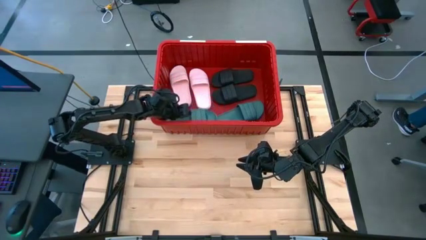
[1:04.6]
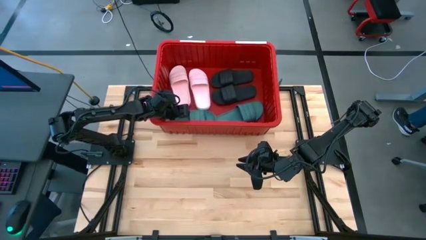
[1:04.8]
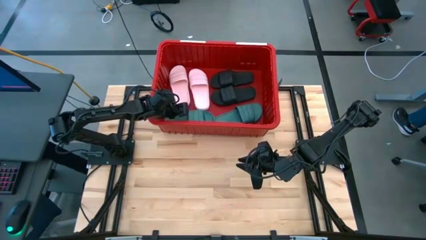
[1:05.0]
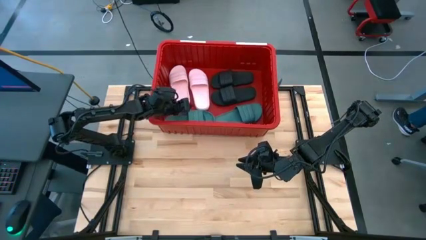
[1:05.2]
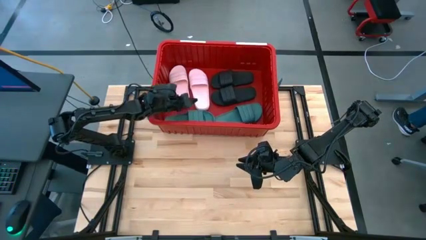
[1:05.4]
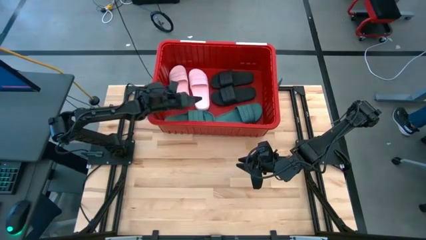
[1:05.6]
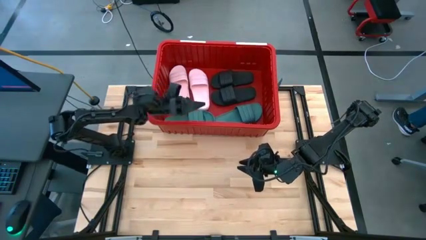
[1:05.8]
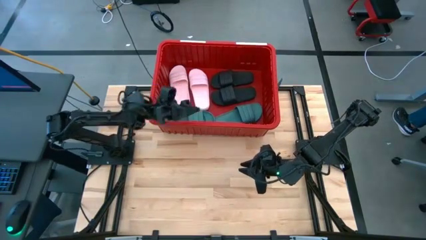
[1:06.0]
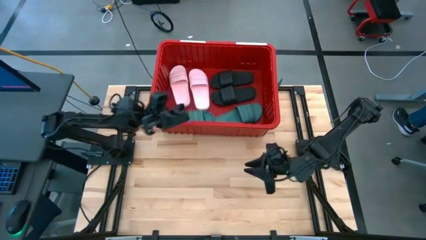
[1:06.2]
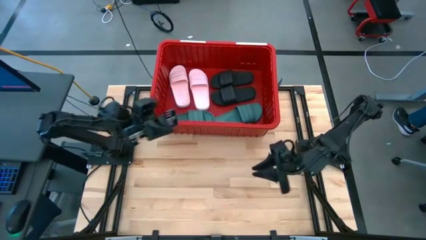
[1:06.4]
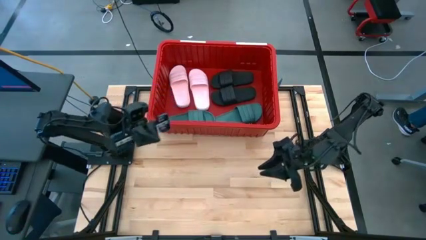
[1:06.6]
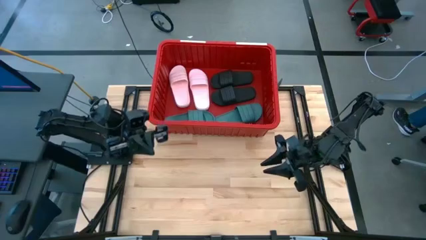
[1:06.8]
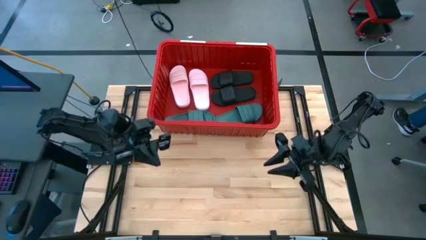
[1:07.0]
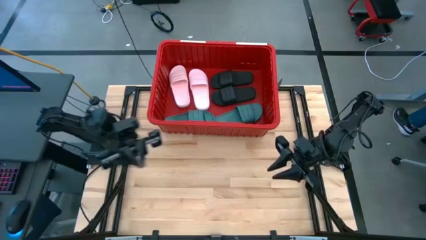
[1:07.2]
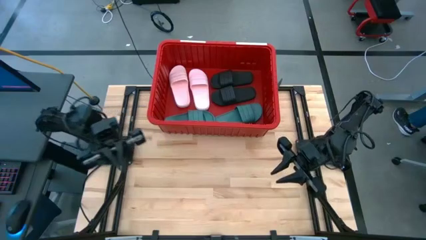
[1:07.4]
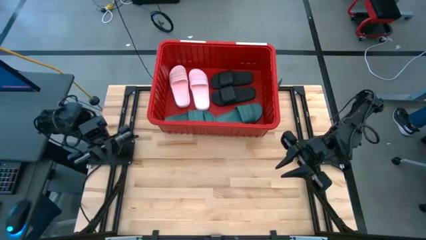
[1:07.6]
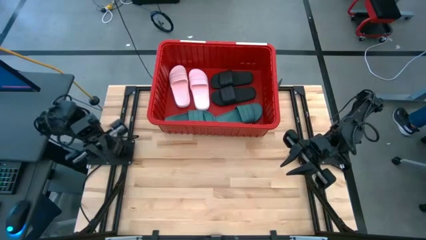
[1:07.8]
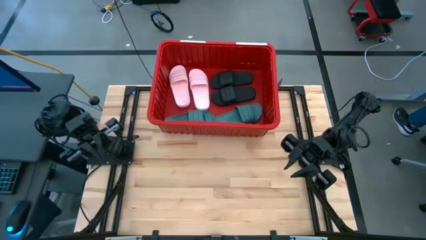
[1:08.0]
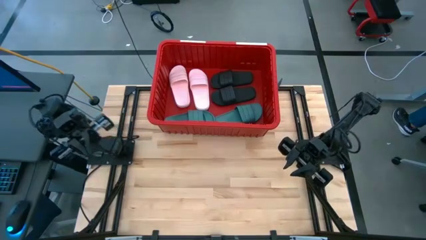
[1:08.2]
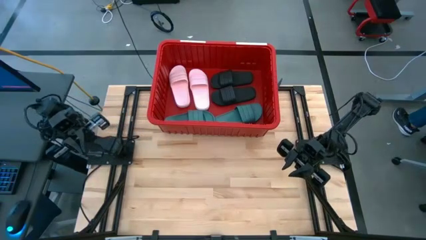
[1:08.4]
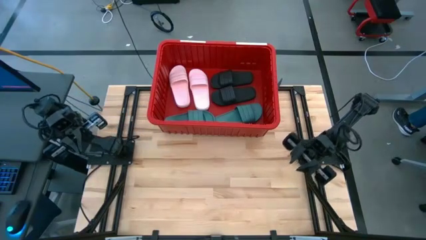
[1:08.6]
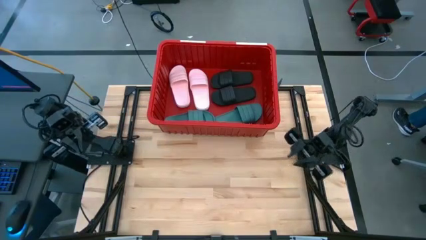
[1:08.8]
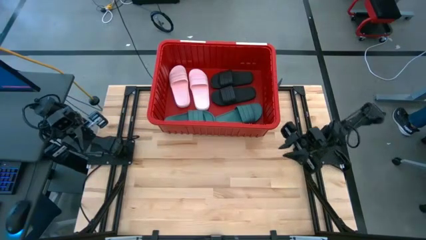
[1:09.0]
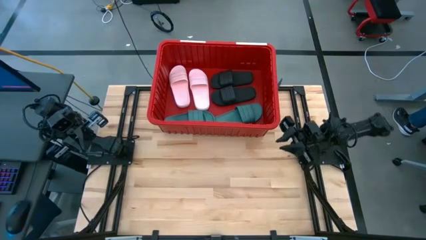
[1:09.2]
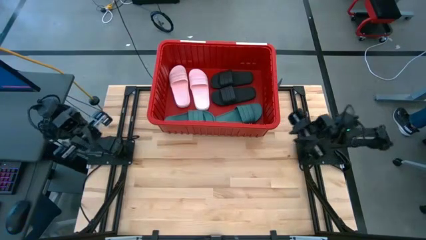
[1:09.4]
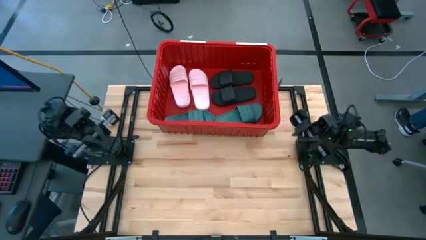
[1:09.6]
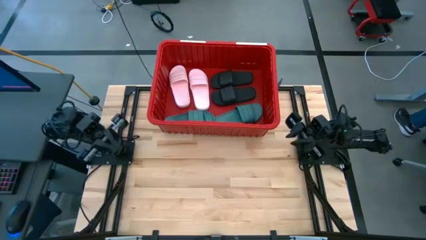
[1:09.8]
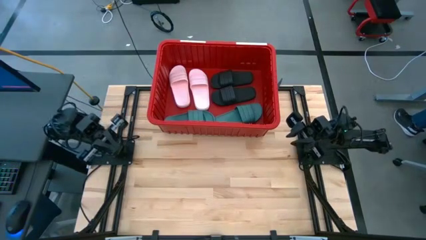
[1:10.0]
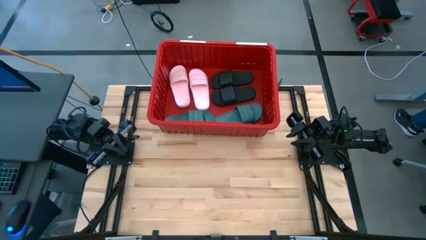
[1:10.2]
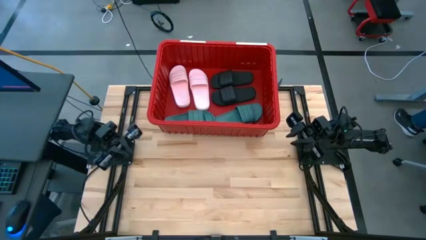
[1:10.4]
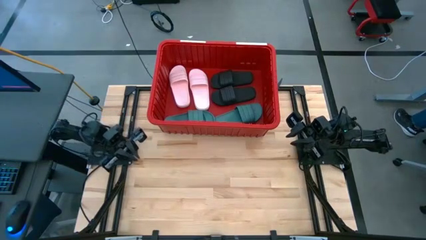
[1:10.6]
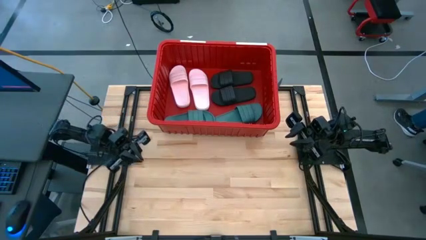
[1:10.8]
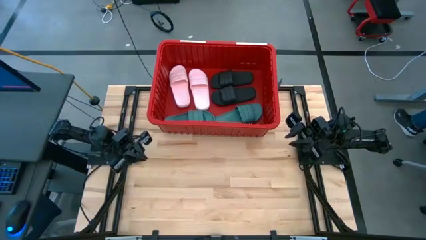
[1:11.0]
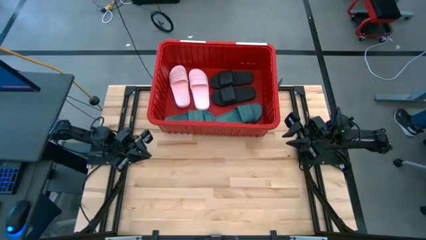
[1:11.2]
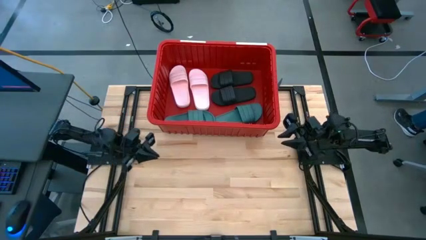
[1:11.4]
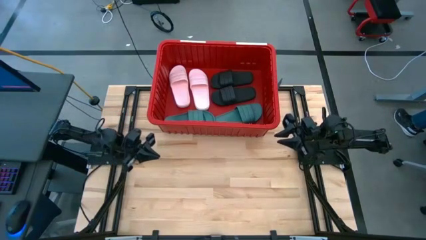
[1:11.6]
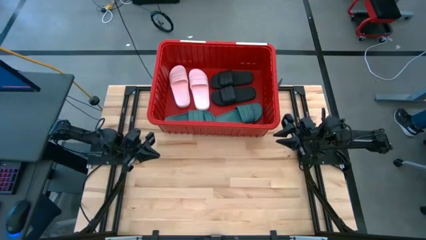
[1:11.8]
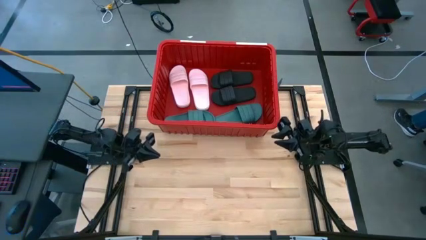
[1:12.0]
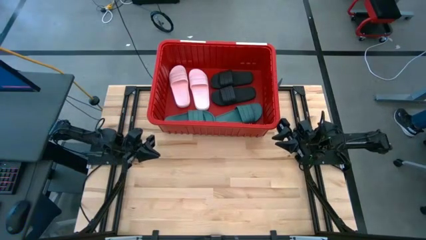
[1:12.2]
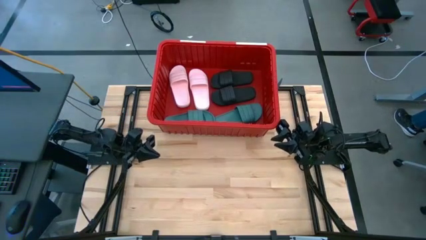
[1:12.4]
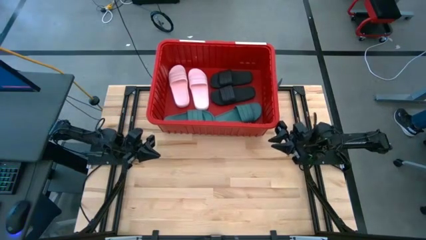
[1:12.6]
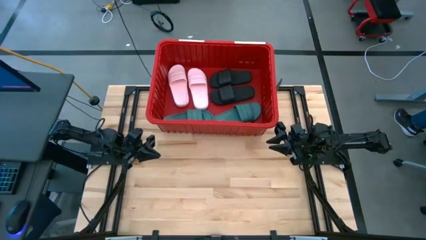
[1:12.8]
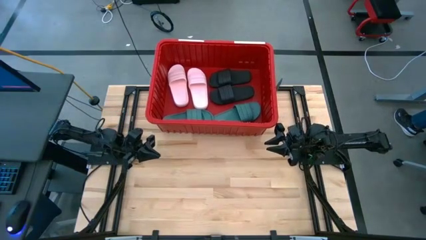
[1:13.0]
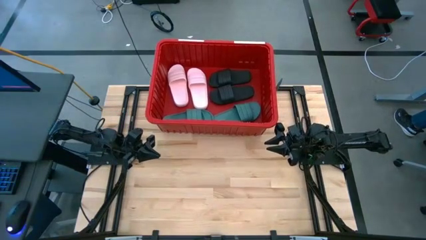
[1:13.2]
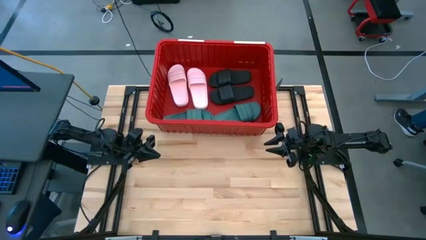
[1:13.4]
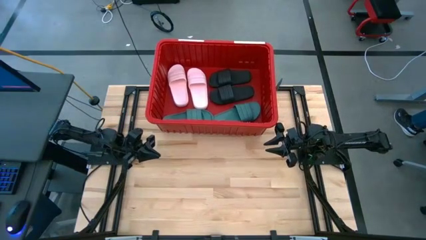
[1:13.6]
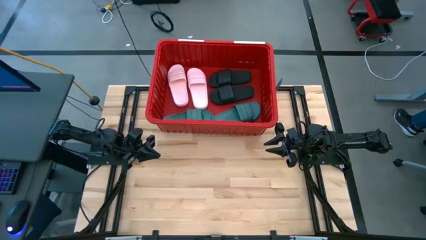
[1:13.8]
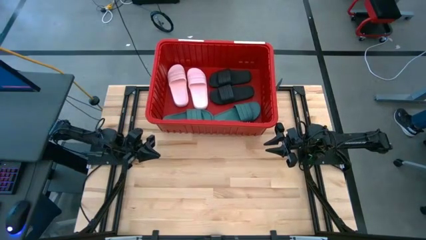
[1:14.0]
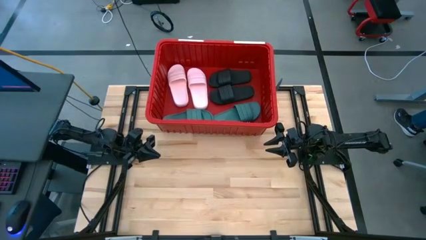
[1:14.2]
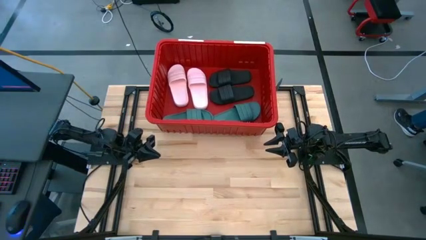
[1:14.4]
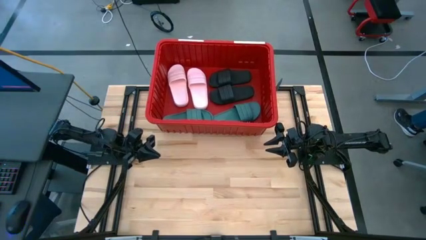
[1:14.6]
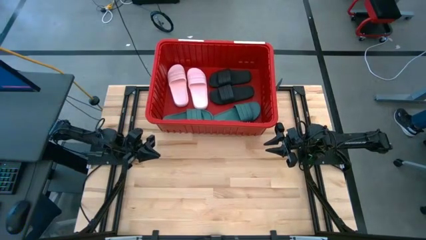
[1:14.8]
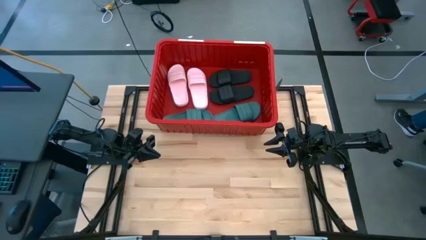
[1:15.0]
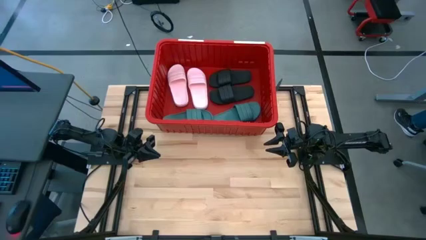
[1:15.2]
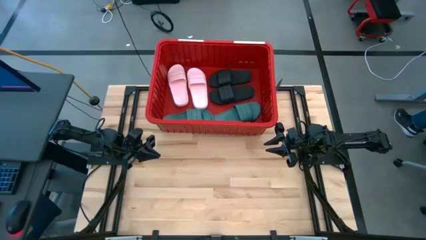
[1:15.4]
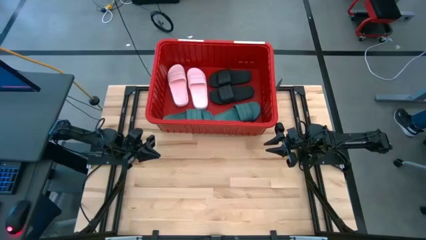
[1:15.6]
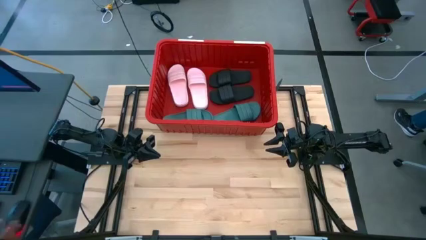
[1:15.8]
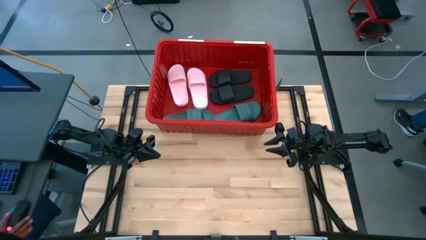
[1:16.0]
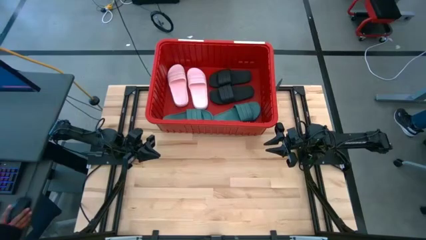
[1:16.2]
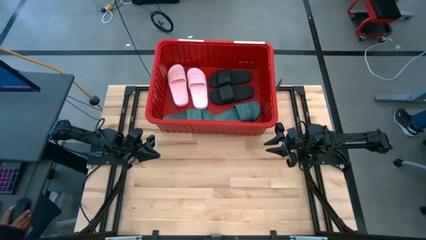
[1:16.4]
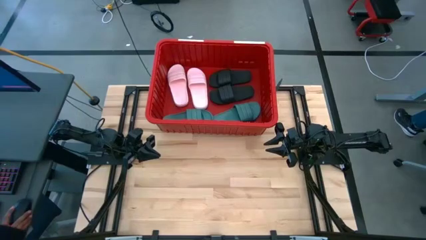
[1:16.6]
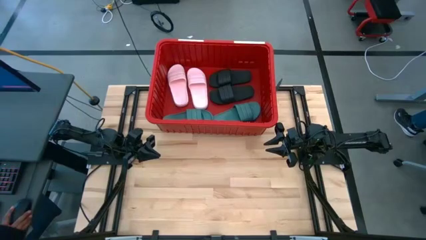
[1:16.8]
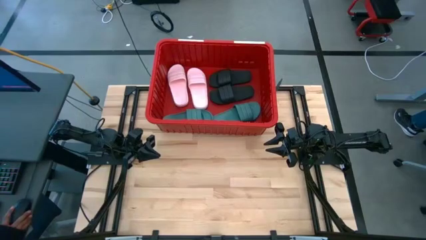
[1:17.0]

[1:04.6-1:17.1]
Task: Pick and place slides into bin
Return to Home Position
